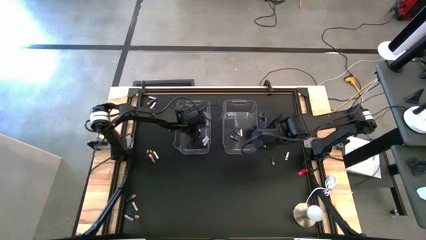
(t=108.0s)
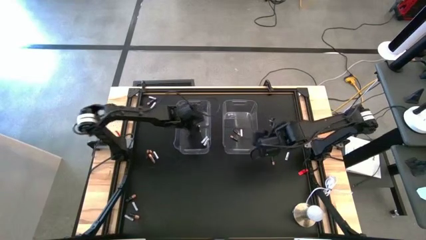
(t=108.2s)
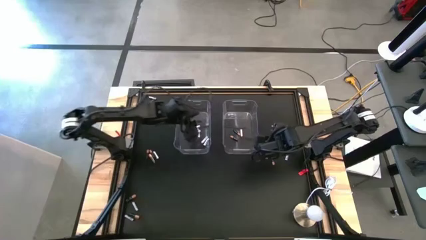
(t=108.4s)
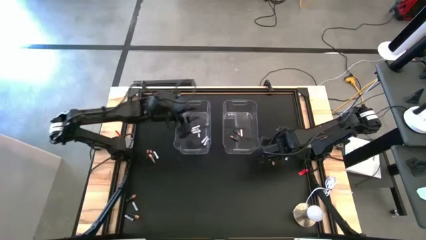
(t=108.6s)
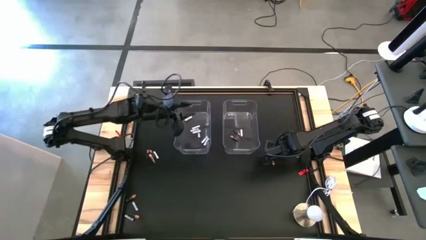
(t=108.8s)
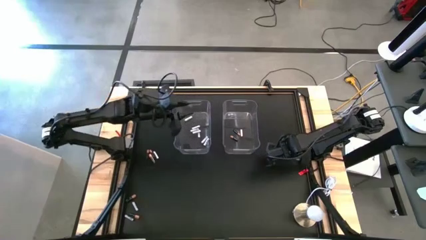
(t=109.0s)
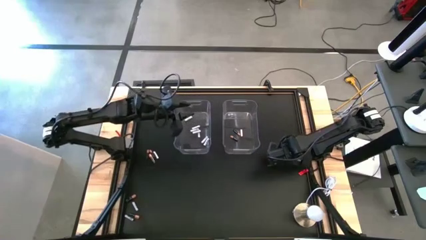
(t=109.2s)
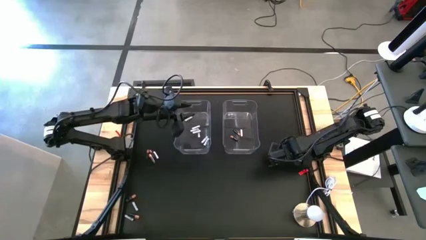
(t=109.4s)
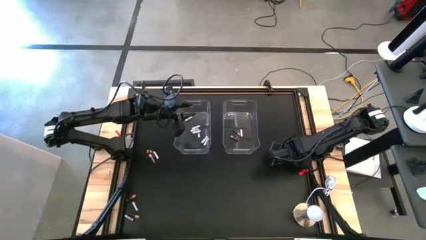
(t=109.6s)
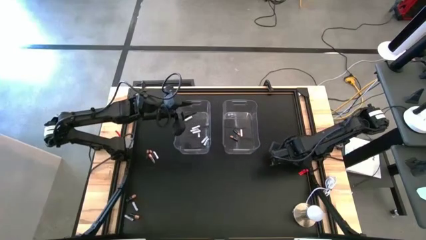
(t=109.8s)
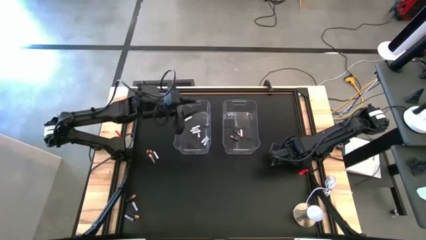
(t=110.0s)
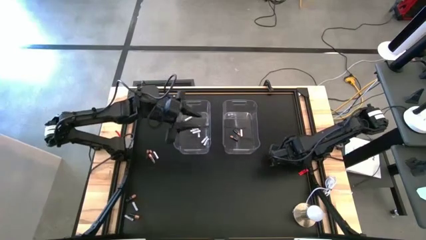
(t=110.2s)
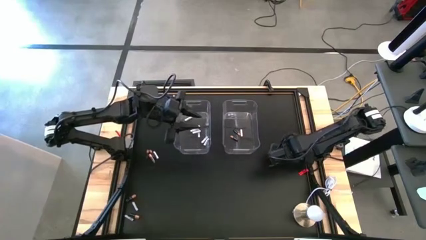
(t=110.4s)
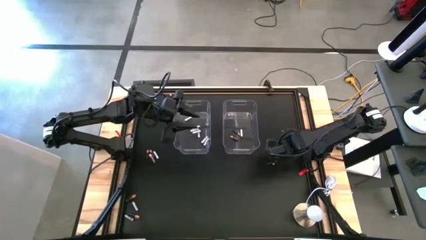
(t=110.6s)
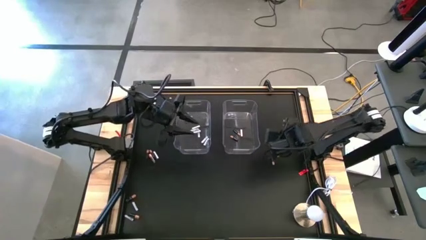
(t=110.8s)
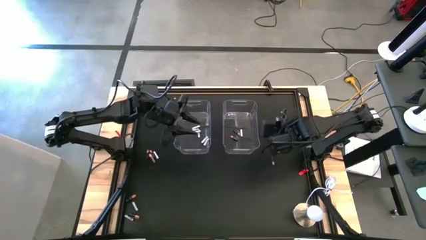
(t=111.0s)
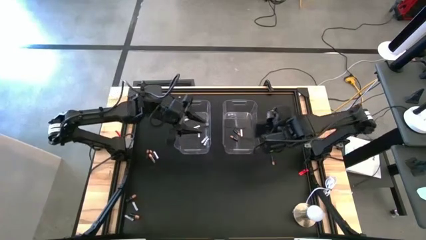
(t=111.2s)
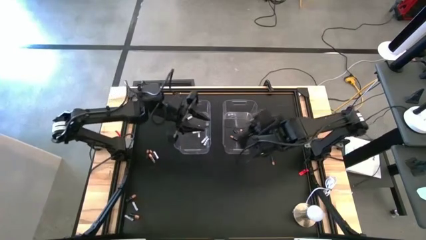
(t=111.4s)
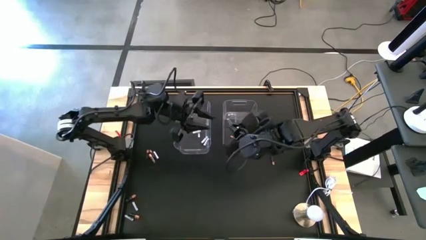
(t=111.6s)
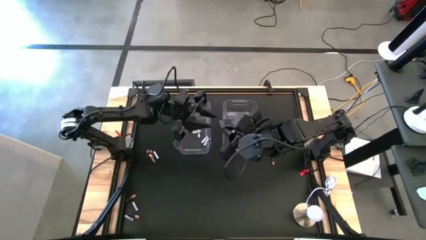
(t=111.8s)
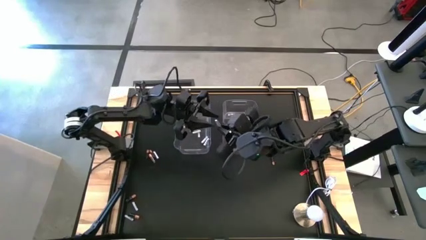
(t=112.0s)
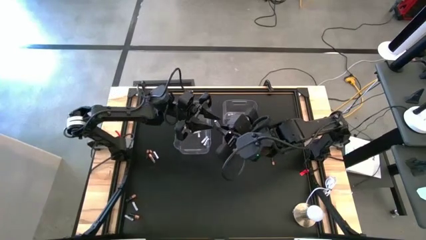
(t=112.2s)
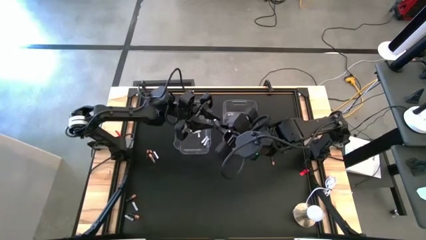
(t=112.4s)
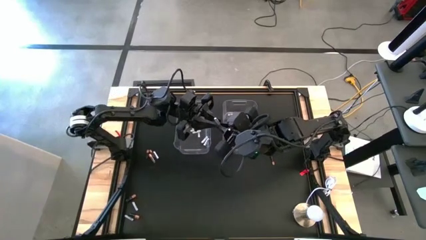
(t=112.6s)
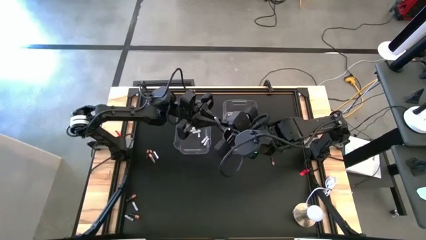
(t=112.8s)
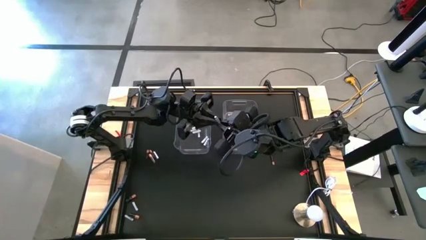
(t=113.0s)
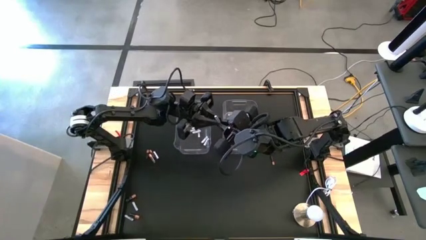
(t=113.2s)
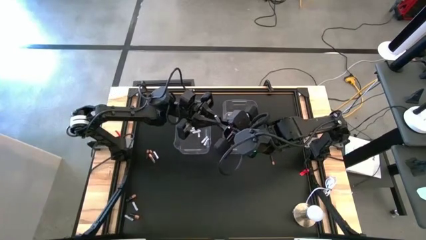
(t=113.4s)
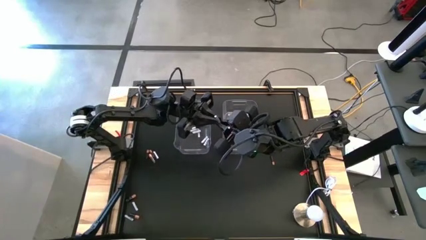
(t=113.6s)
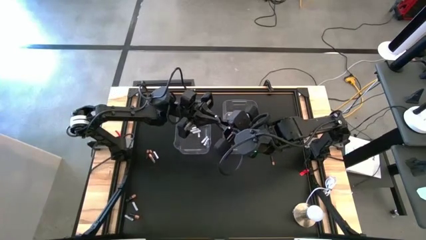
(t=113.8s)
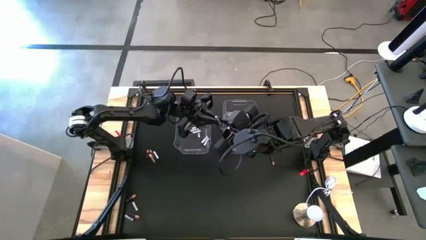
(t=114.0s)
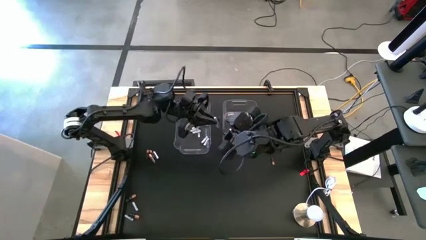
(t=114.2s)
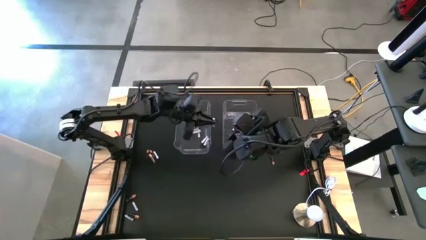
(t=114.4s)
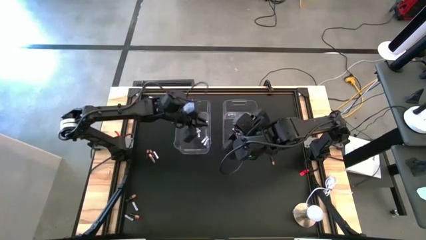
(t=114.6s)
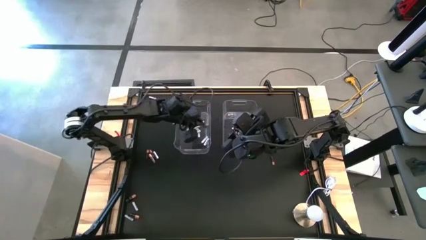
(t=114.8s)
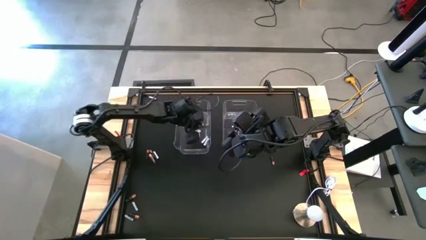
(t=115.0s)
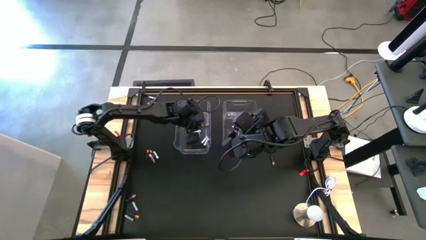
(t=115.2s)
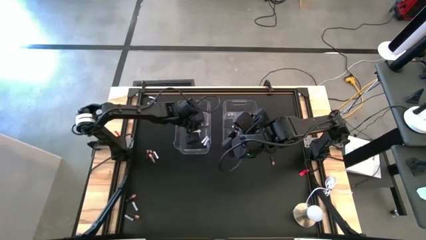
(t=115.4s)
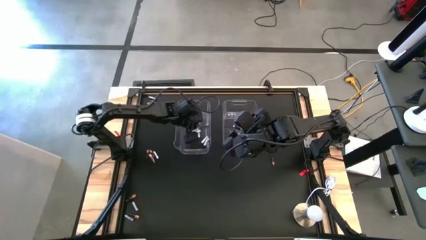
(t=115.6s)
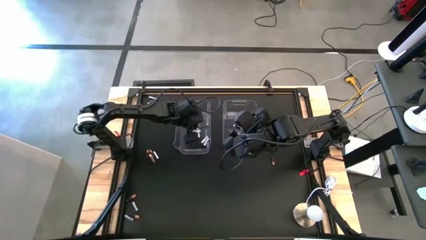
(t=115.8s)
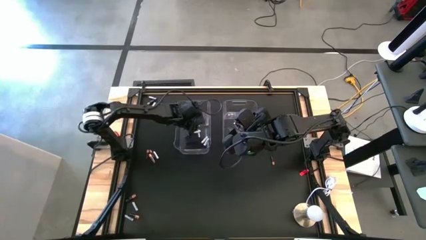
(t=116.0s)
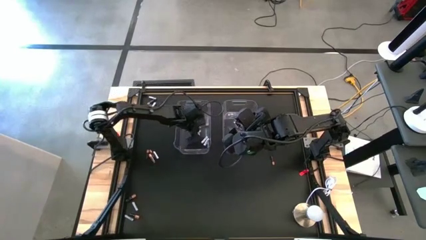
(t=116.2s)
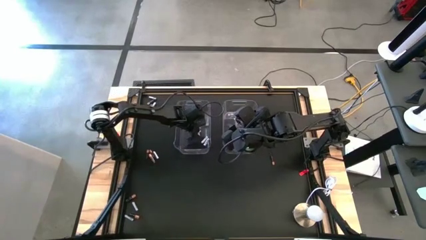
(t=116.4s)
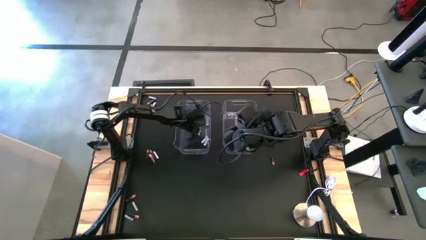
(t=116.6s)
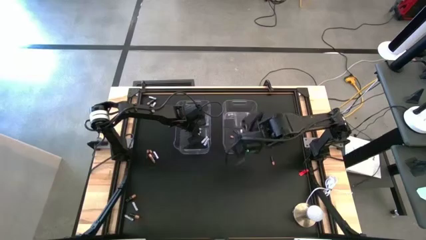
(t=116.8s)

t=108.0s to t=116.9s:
Task: Sort batteries
Put the white battery into the left transparent bin

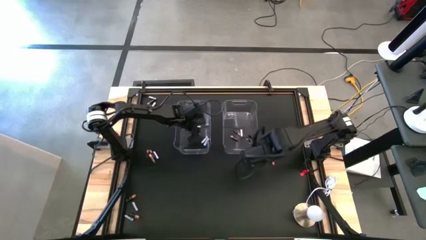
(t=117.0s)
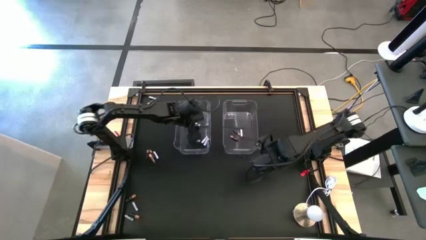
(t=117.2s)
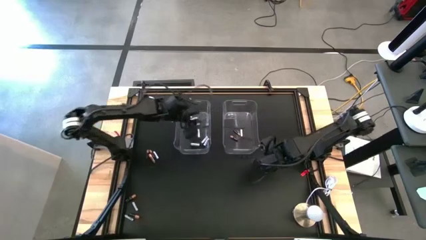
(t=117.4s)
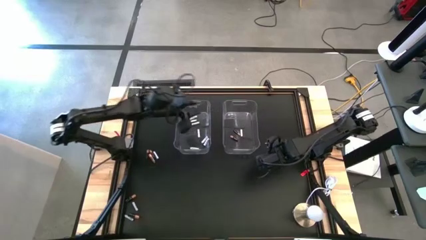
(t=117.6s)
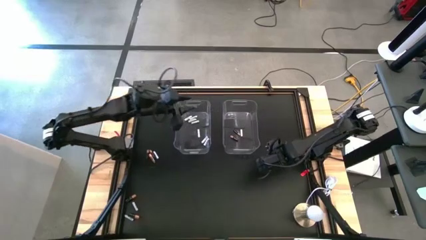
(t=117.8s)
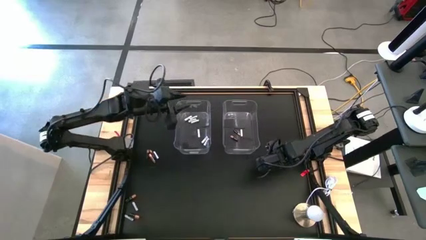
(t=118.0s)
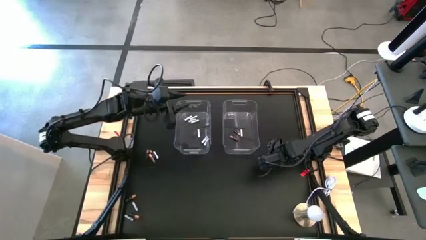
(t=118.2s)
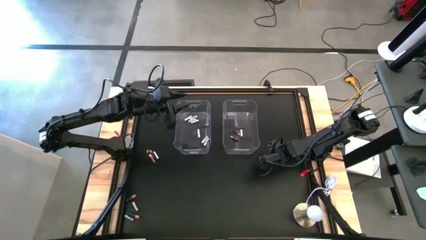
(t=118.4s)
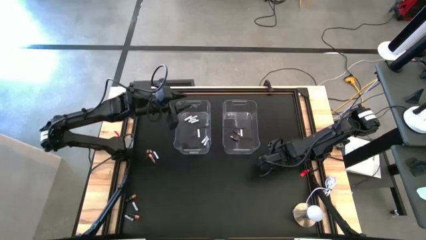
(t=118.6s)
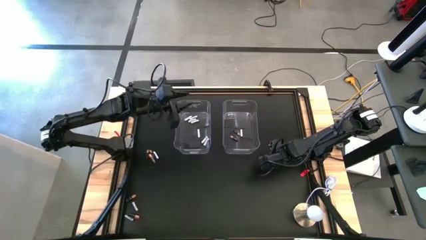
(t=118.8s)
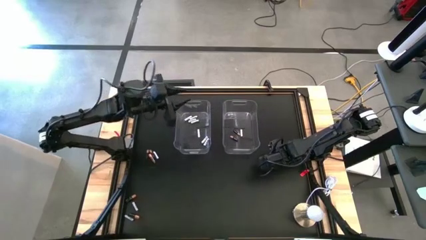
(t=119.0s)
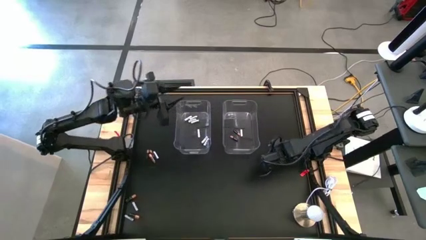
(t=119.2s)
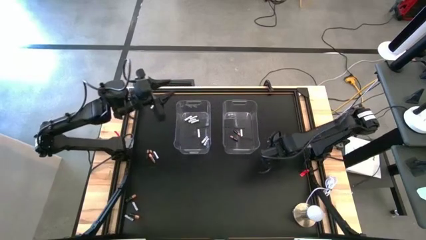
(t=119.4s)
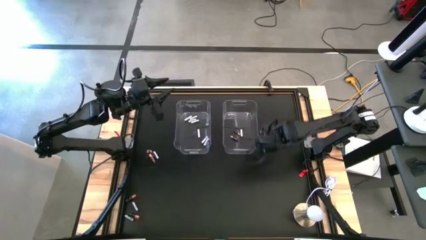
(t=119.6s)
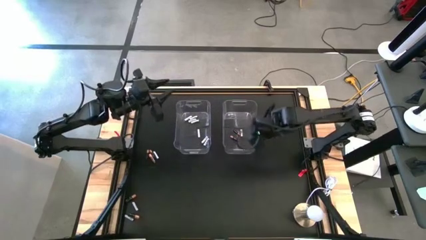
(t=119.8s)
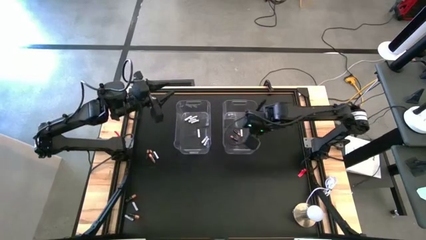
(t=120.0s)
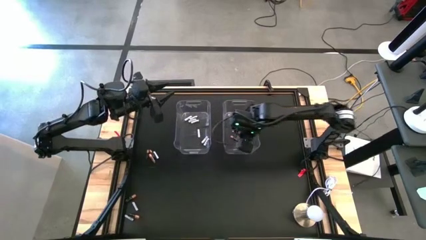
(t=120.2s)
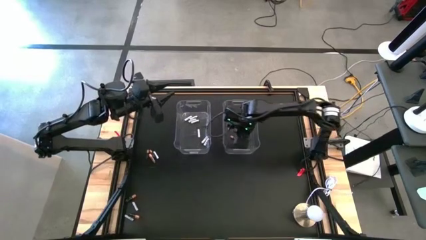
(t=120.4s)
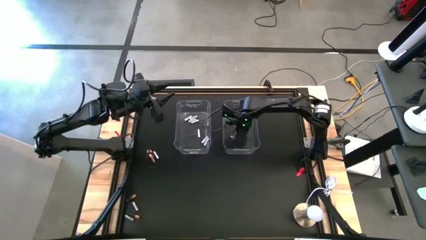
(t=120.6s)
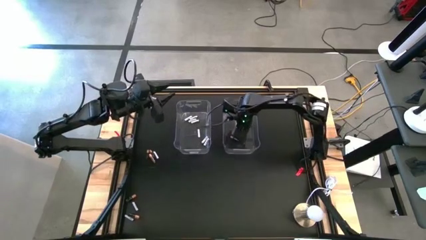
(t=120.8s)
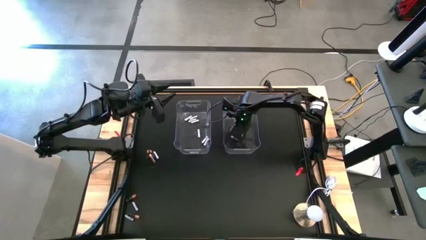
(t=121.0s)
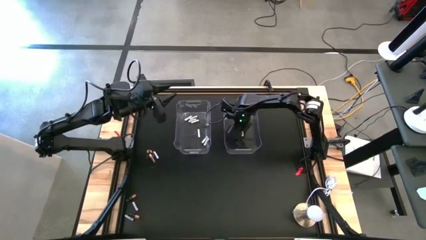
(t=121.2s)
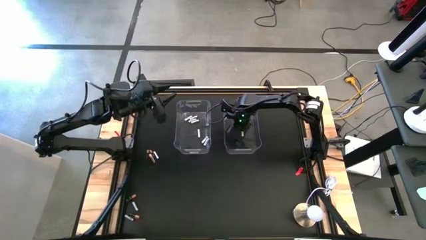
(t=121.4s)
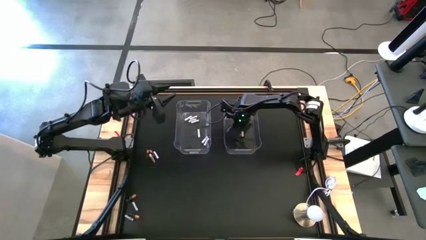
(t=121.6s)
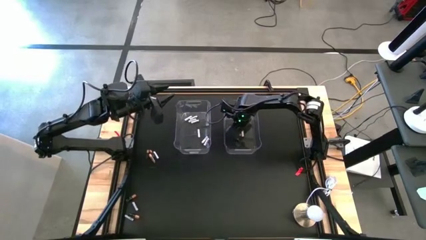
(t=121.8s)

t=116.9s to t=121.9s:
Put the black battery into the right transparent bin
